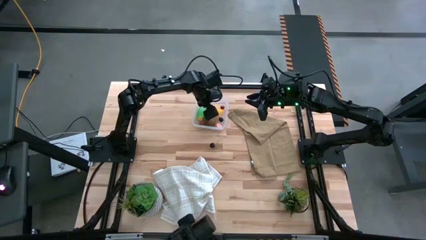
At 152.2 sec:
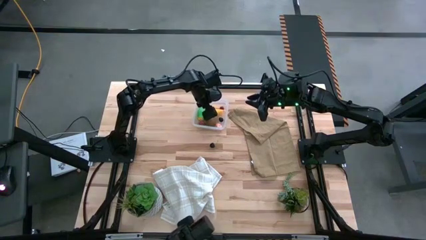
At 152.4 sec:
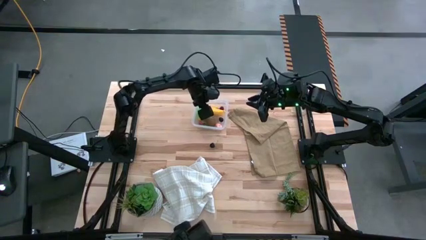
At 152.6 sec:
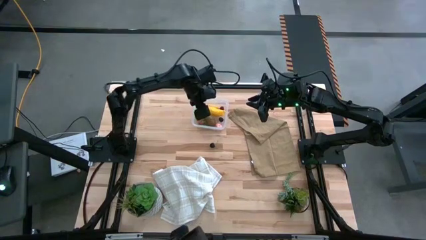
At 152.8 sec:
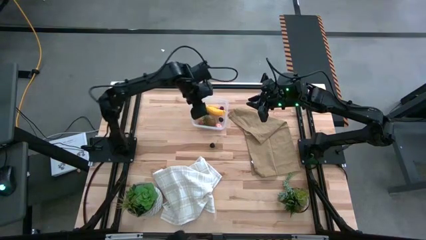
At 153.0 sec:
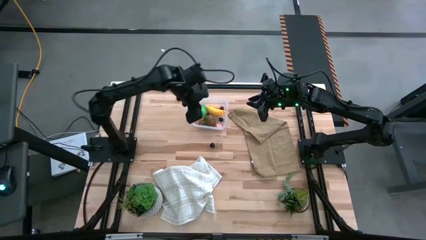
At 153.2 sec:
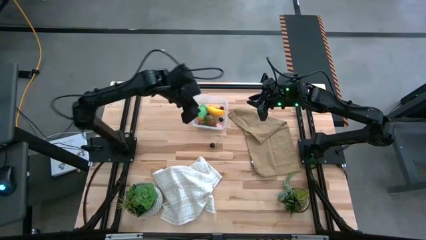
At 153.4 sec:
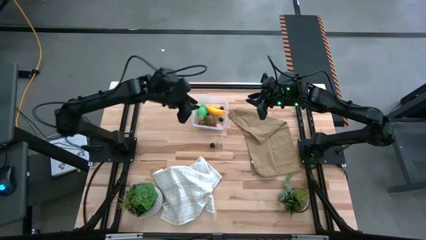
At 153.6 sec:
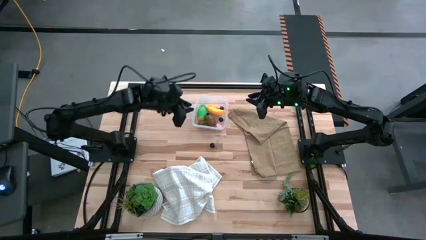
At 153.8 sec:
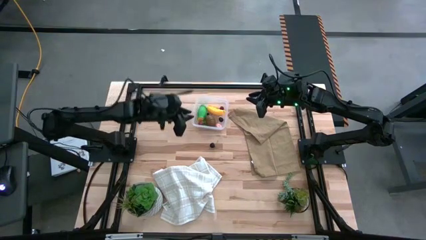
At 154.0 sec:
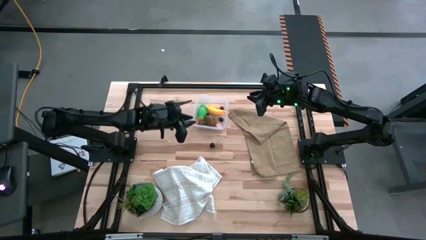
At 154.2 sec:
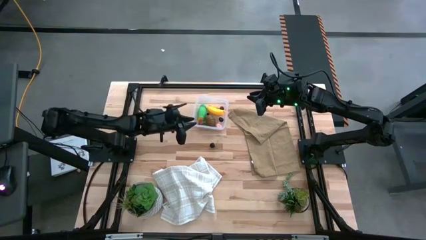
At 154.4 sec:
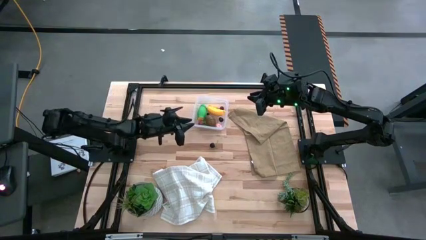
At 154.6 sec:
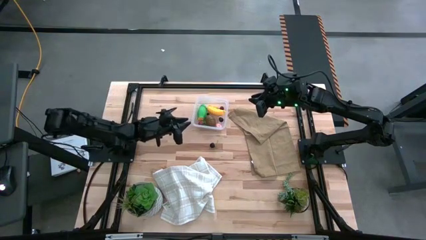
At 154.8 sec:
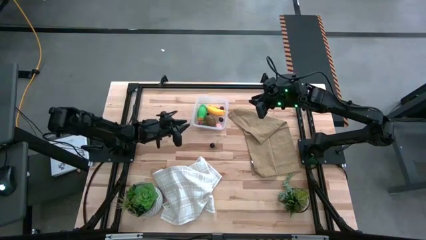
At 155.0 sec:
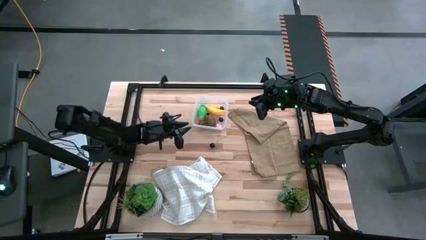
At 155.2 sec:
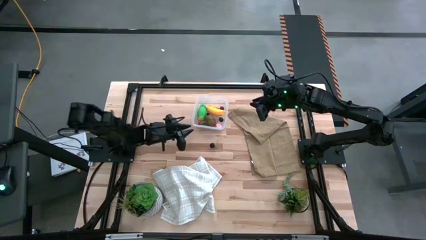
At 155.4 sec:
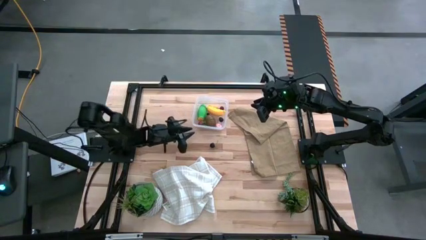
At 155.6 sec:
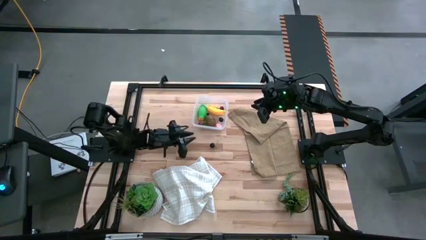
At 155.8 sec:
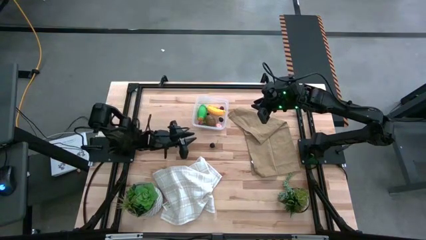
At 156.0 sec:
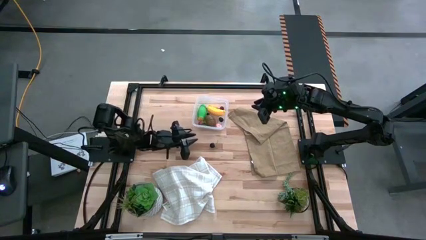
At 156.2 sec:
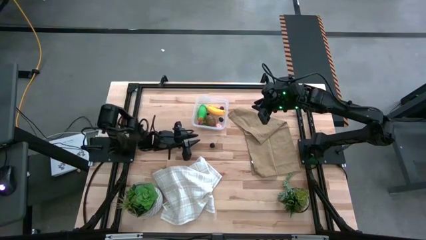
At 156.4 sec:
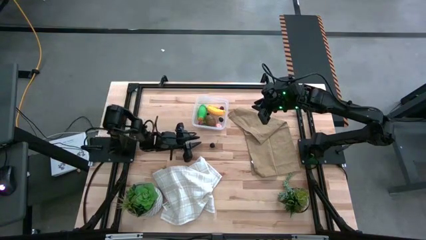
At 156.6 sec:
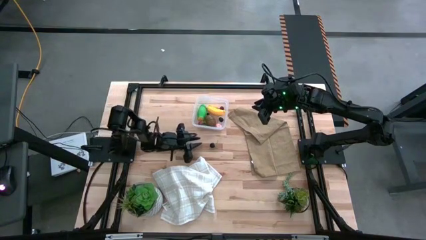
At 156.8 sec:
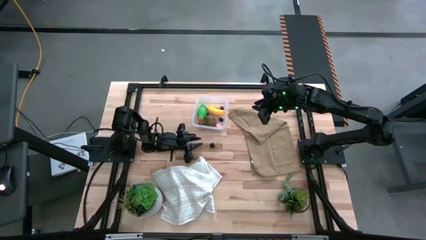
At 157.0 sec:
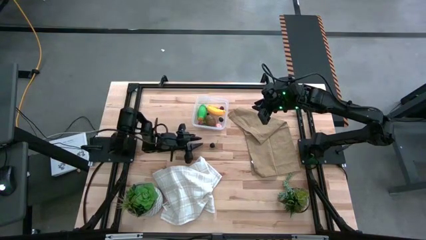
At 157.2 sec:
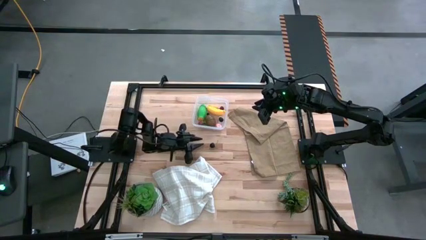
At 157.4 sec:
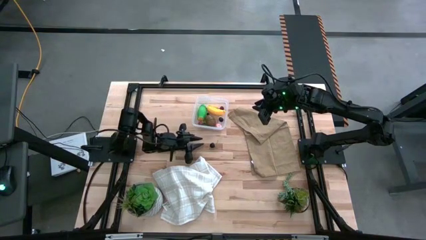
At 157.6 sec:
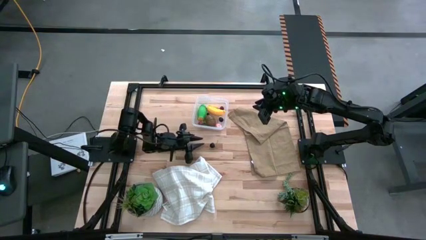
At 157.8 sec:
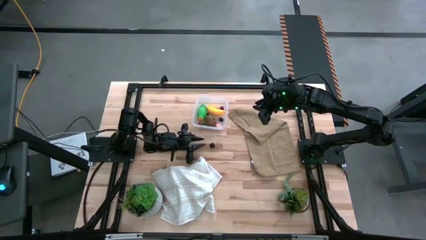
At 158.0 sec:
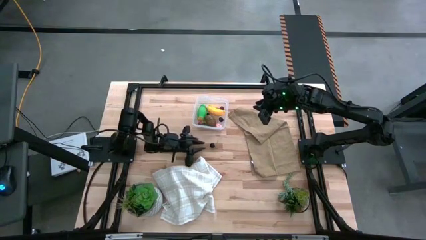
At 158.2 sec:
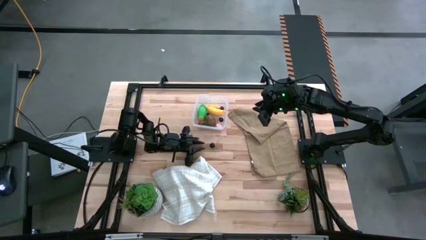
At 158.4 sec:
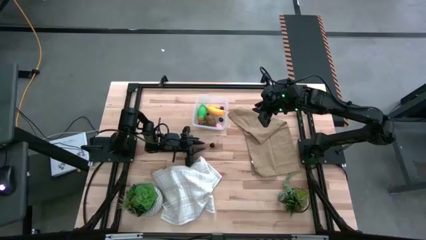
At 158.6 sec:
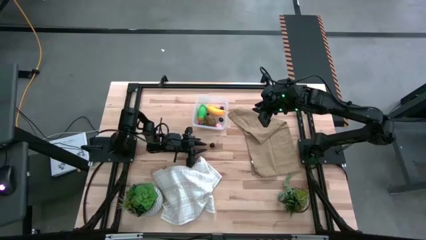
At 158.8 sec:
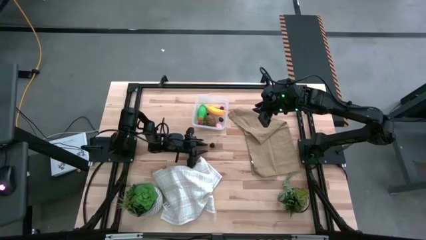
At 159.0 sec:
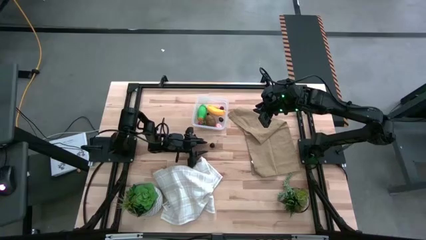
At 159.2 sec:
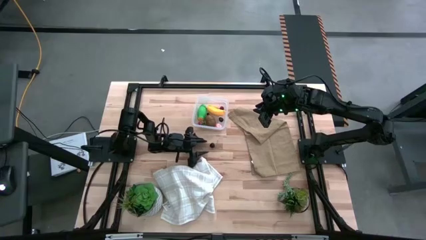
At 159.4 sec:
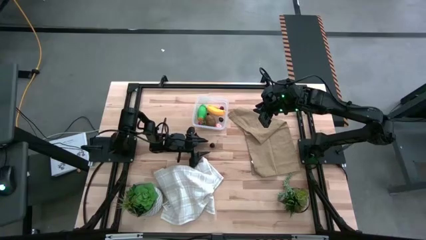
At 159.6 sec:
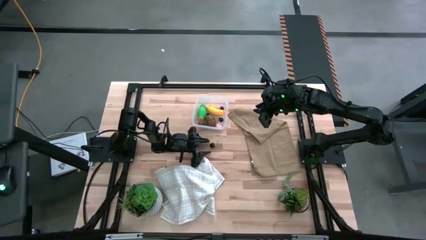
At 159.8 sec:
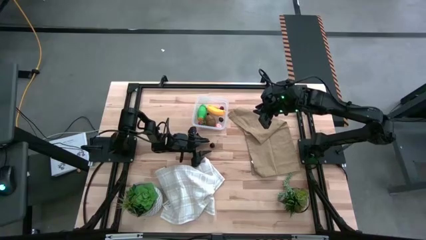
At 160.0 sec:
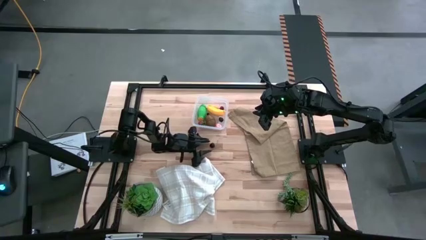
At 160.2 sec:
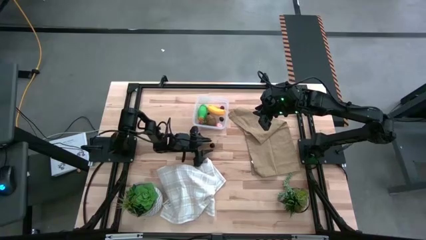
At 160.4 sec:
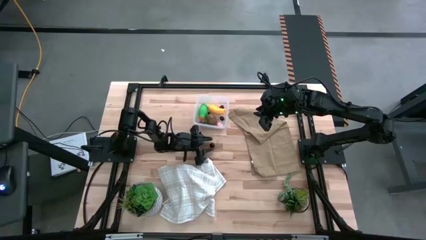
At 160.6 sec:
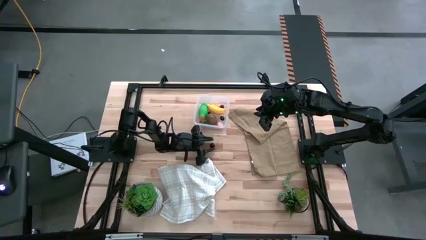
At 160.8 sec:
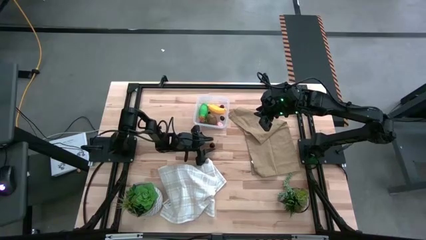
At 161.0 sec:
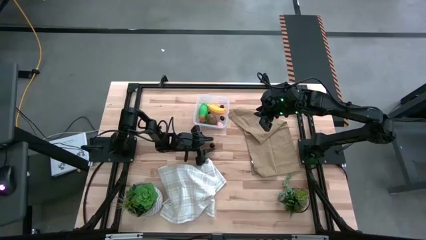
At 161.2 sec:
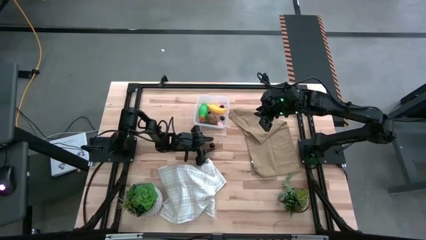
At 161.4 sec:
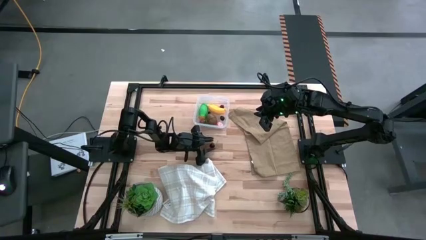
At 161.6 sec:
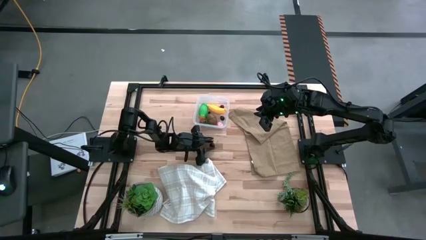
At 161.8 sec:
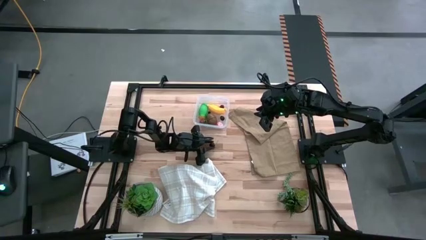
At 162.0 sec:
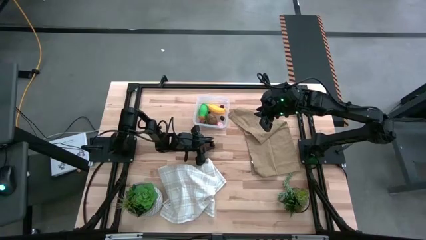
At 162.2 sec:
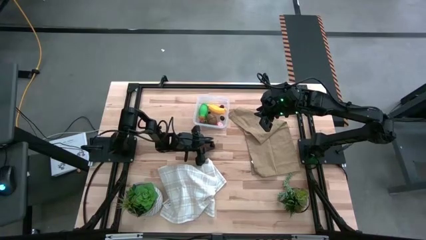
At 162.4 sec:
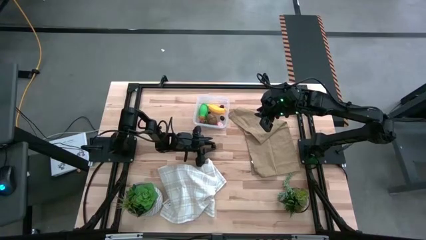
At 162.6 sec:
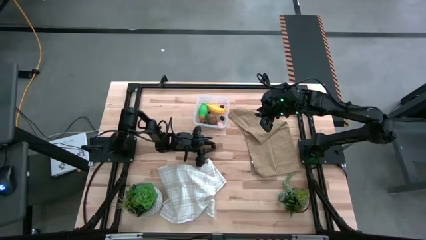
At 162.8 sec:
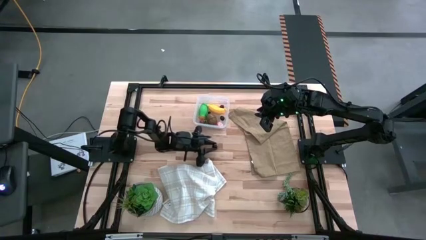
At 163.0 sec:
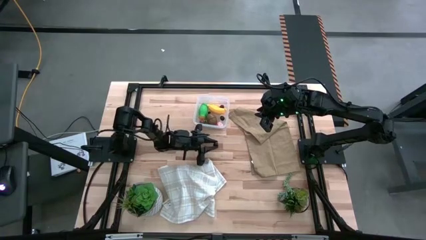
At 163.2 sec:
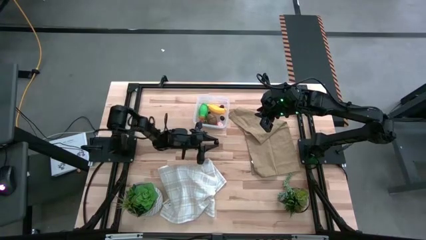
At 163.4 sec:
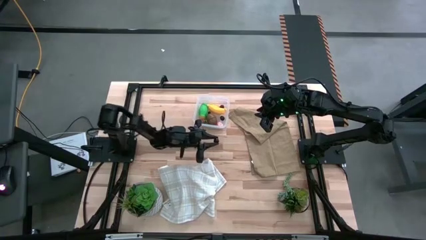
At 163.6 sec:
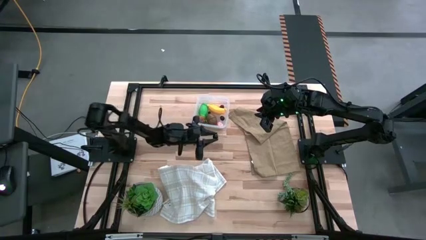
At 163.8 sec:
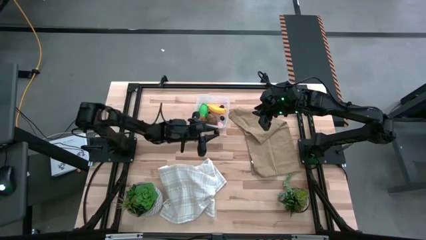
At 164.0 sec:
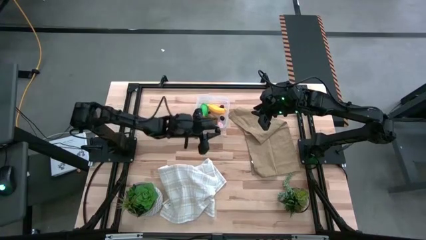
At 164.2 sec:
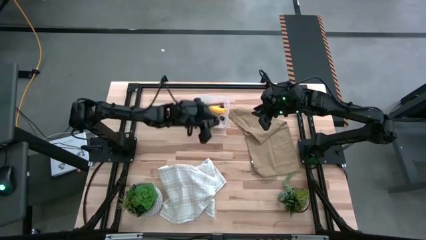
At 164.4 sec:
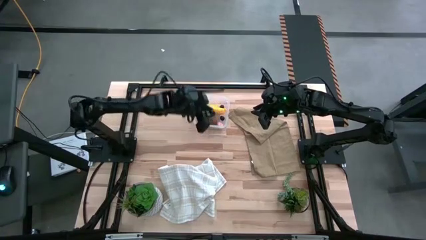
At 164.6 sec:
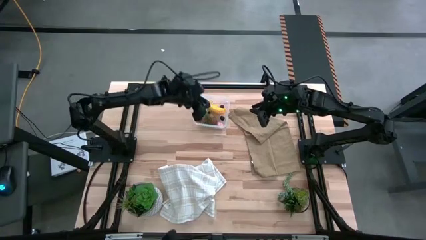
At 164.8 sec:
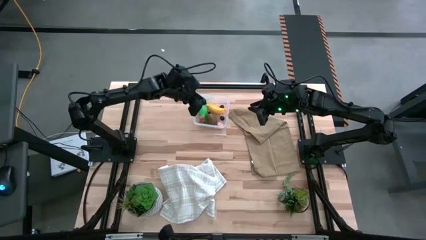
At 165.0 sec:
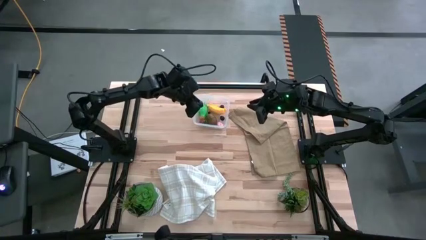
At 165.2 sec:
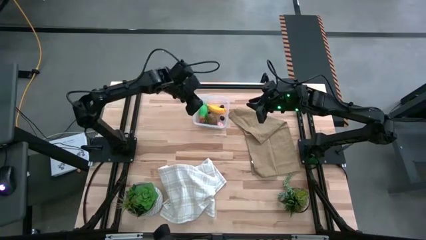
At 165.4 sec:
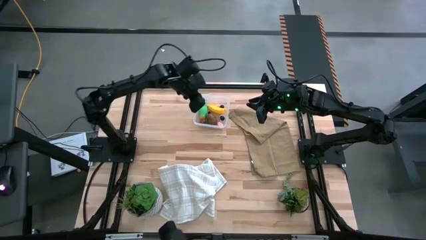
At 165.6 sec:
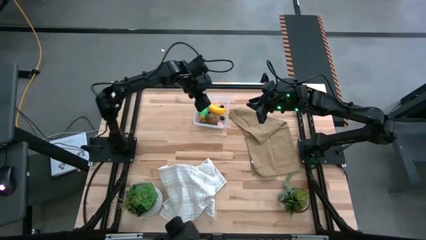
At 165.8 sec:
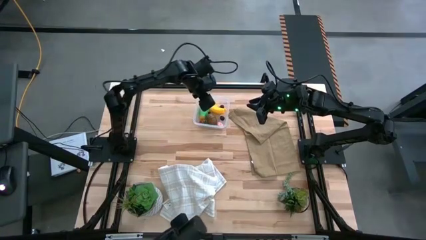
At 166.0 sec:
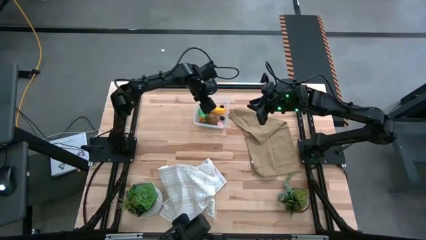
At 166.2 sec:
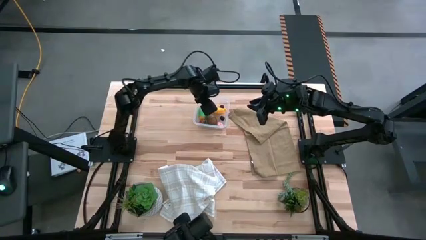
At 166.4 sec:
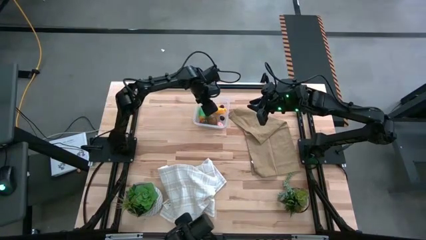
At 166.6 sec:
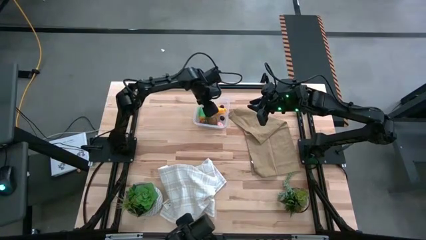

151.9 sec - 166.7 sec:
Task: Pick and placing Produce into tupperware
Put the black cherry into the transparent bin

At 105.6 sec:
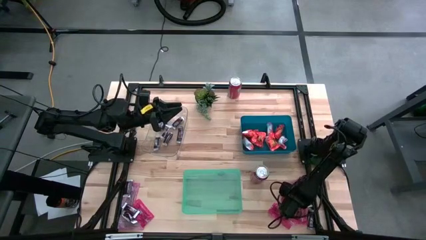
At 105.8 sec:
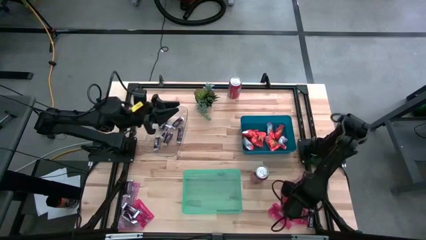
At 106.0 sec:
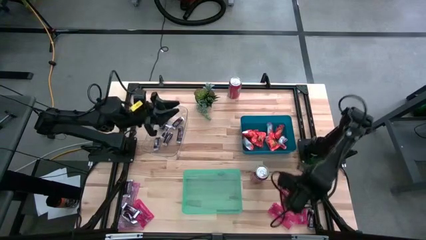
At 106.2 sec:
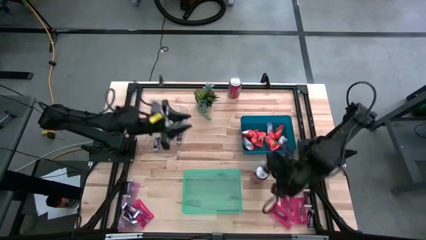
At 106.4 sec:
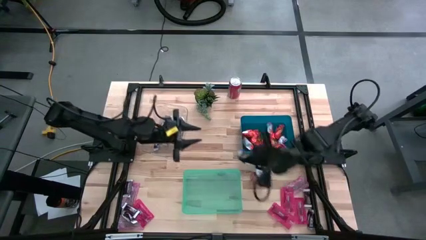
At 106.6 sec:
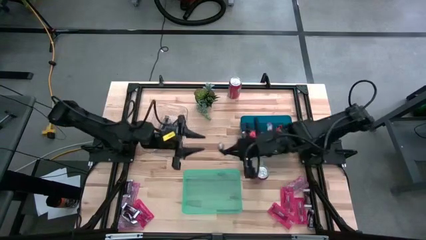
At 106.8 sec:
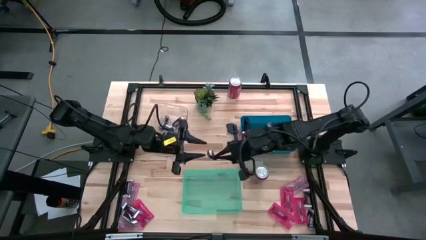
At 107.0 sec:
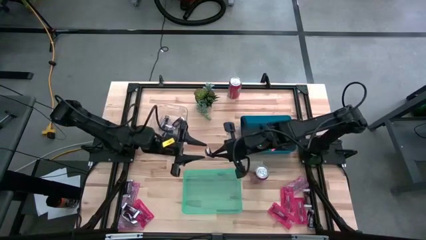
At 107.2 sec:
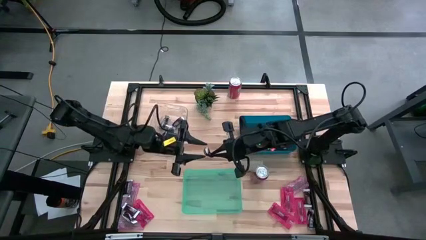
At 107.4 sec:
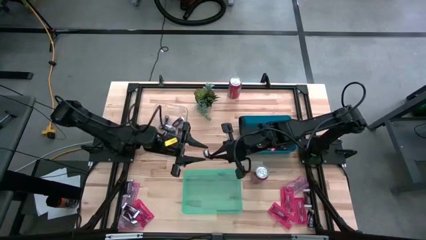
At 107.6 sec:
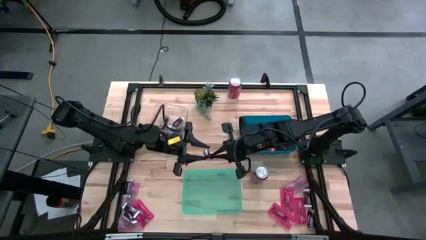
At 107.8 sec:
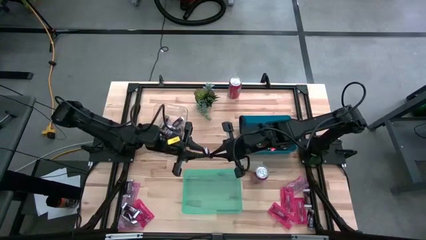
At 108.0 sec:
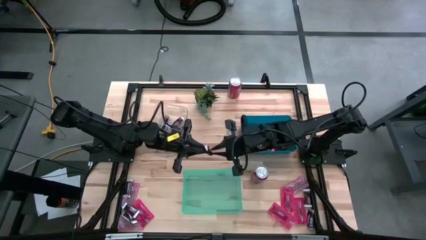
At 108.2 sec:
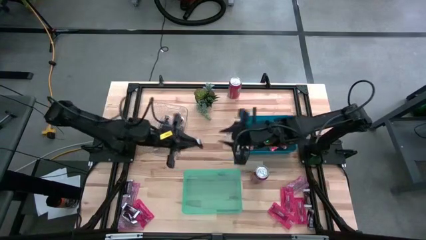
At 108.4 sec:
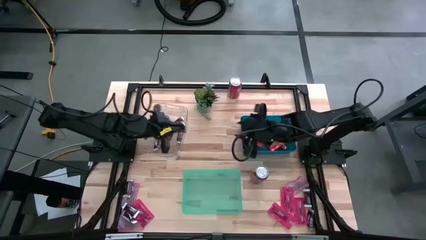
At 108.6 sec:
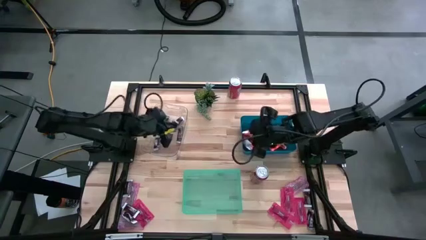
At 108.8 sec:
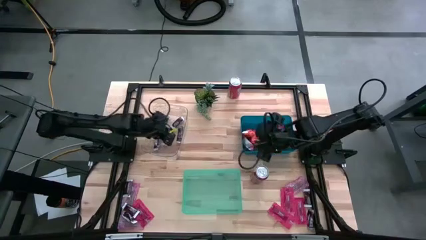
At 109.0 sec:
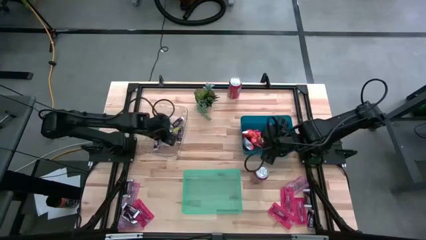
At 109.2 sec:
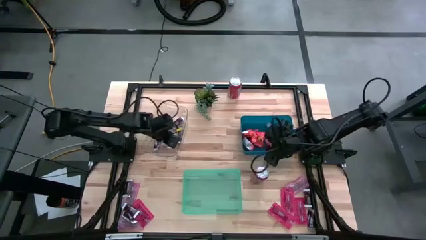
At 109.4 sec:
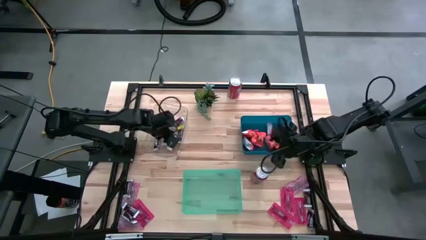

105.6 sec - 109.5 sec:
Task: Sort candy
Put the brown chocolate bar into the transparent bin
